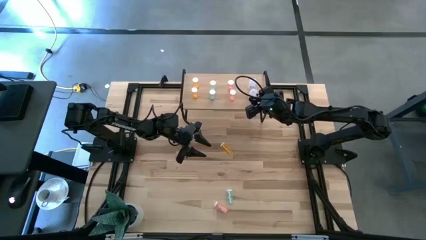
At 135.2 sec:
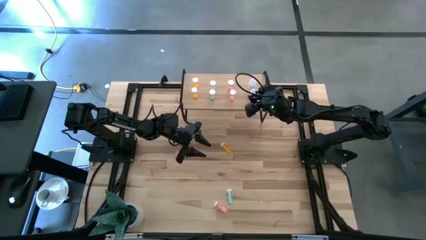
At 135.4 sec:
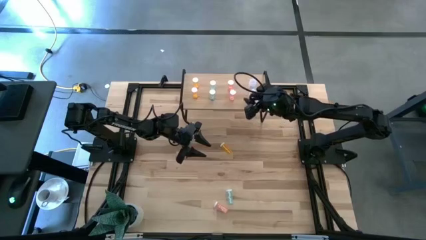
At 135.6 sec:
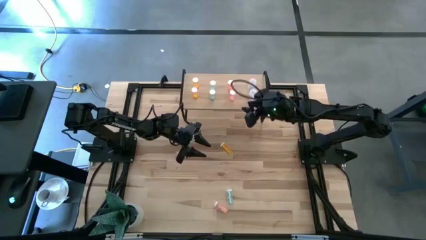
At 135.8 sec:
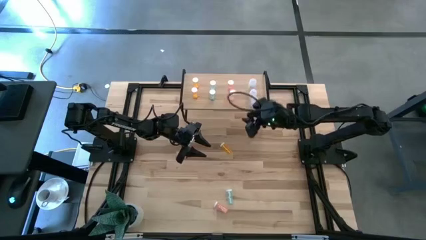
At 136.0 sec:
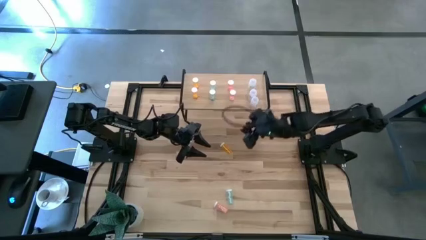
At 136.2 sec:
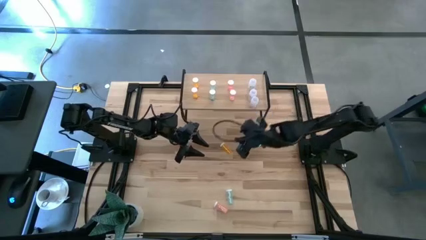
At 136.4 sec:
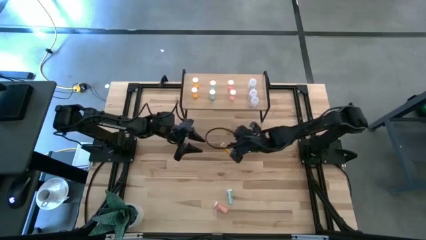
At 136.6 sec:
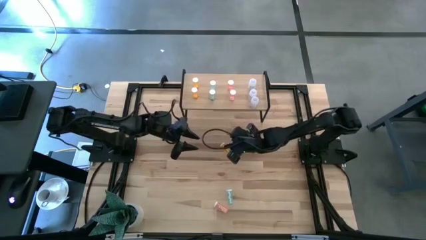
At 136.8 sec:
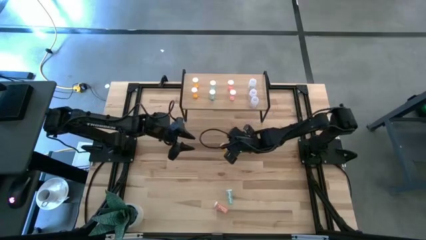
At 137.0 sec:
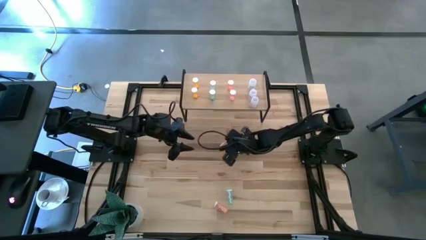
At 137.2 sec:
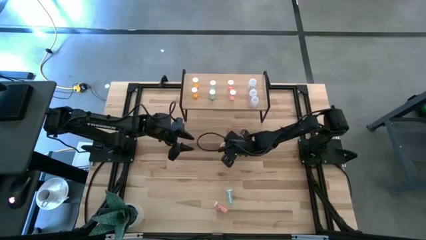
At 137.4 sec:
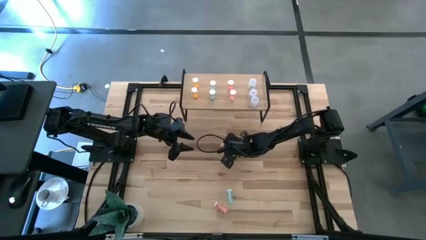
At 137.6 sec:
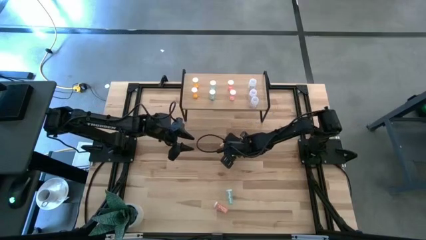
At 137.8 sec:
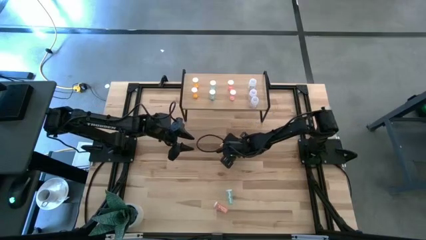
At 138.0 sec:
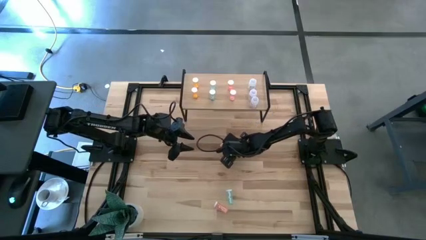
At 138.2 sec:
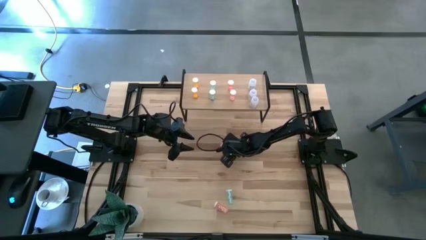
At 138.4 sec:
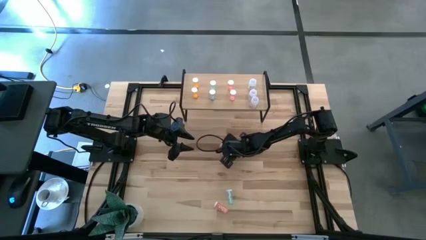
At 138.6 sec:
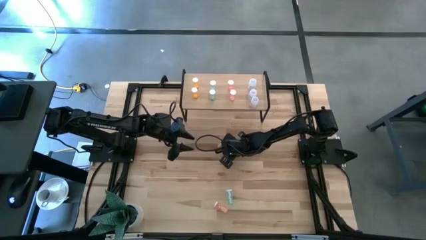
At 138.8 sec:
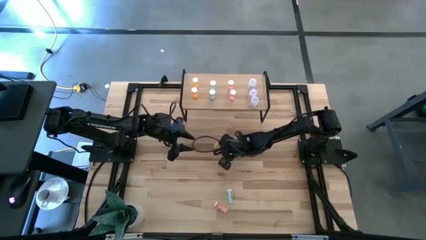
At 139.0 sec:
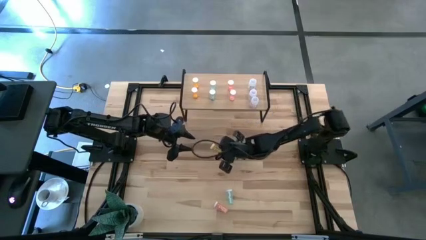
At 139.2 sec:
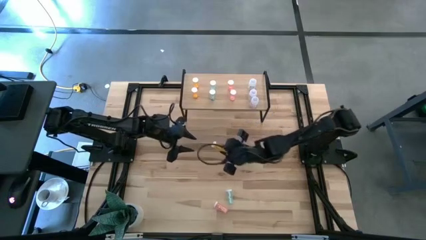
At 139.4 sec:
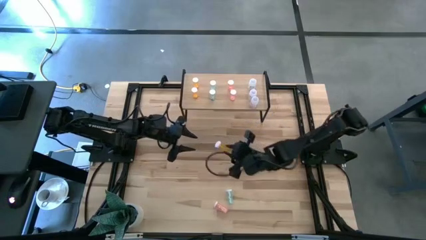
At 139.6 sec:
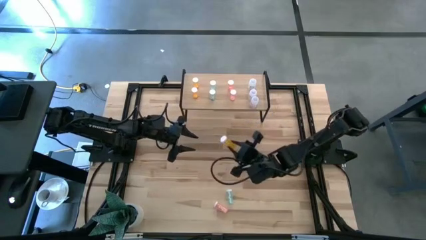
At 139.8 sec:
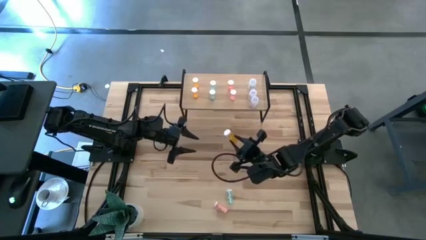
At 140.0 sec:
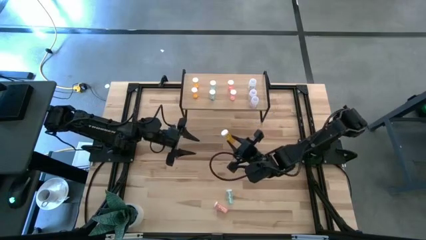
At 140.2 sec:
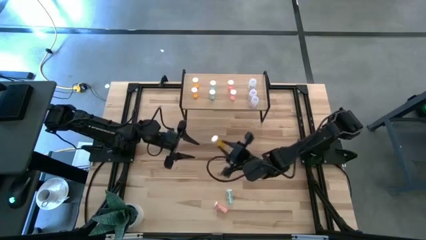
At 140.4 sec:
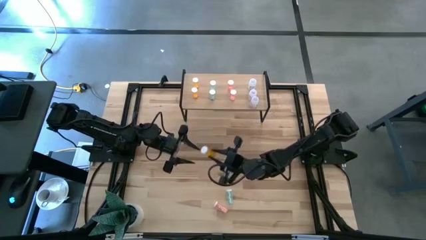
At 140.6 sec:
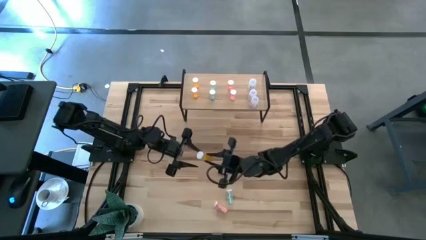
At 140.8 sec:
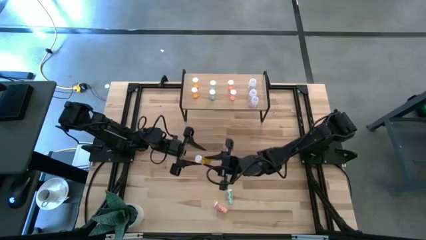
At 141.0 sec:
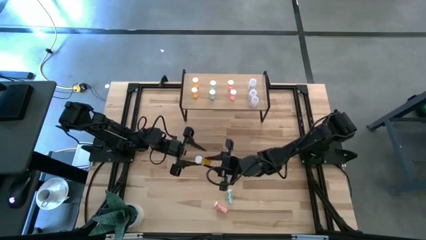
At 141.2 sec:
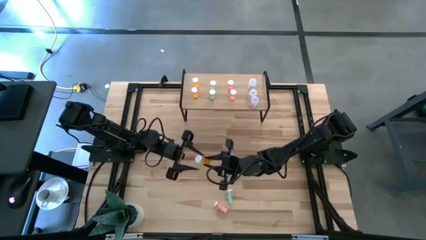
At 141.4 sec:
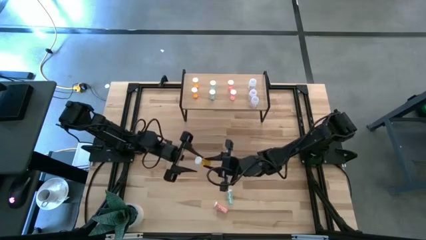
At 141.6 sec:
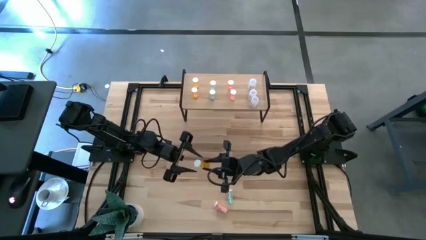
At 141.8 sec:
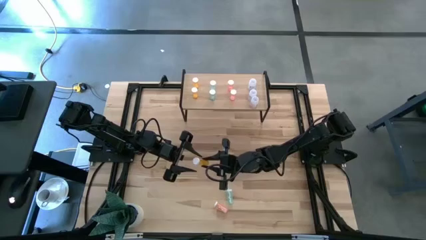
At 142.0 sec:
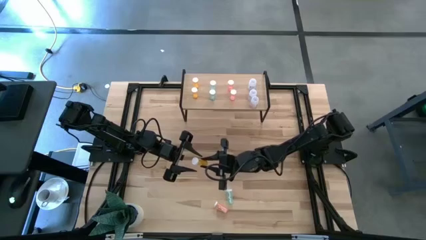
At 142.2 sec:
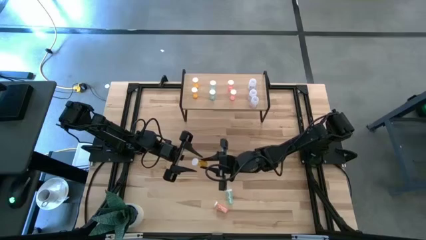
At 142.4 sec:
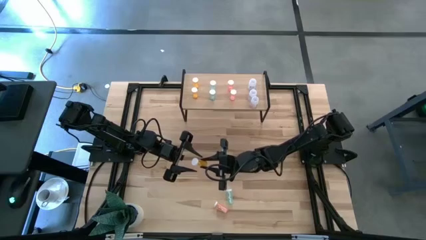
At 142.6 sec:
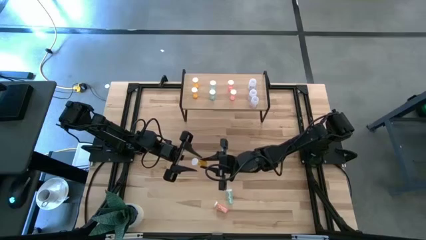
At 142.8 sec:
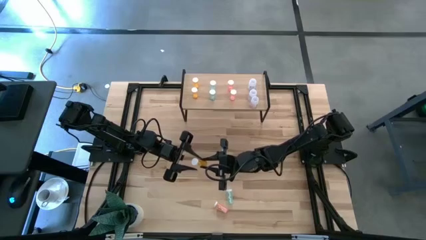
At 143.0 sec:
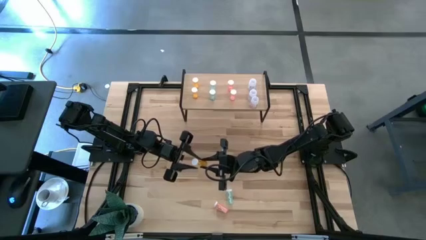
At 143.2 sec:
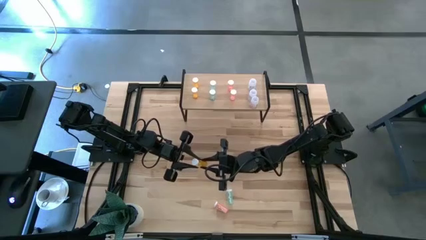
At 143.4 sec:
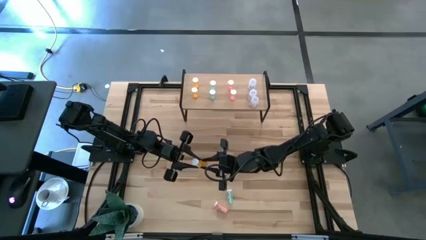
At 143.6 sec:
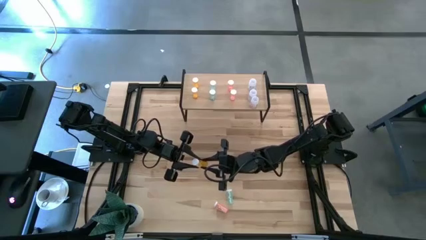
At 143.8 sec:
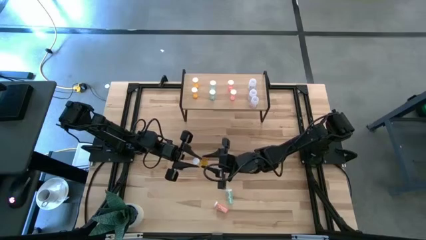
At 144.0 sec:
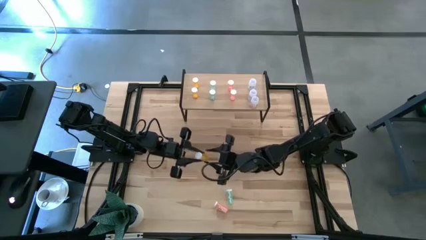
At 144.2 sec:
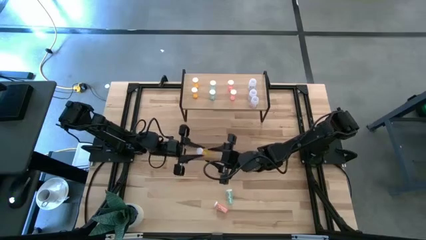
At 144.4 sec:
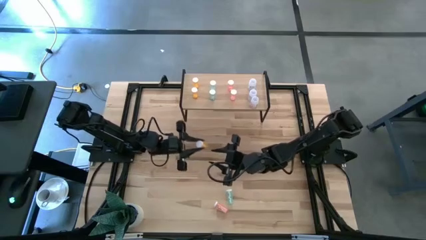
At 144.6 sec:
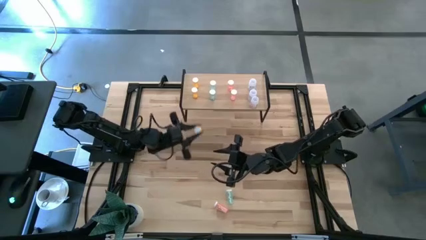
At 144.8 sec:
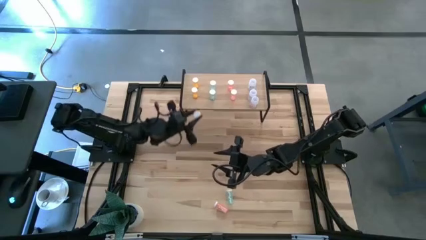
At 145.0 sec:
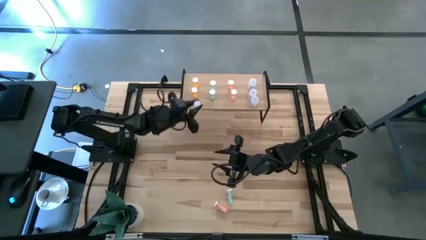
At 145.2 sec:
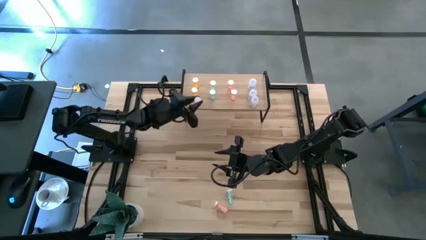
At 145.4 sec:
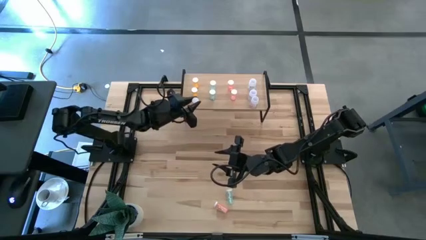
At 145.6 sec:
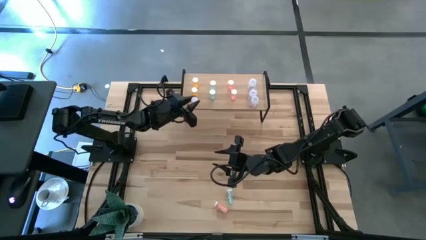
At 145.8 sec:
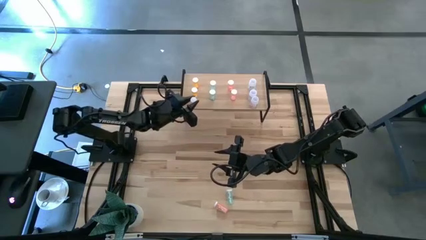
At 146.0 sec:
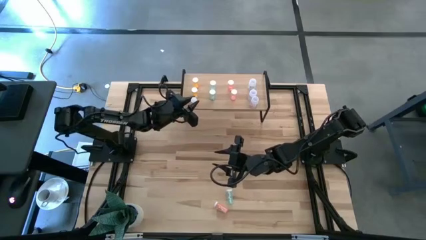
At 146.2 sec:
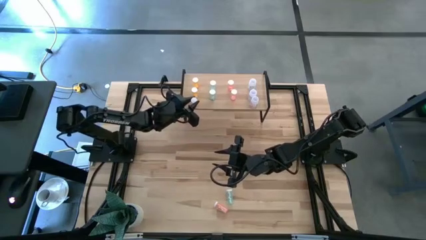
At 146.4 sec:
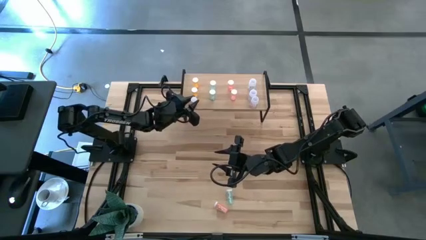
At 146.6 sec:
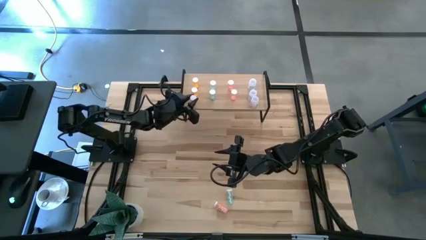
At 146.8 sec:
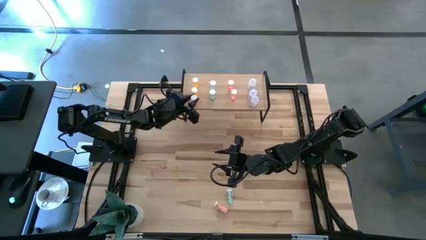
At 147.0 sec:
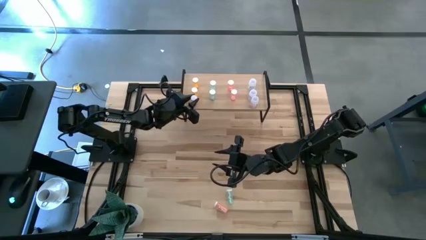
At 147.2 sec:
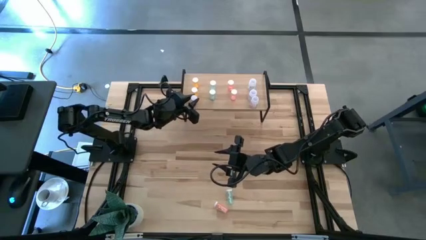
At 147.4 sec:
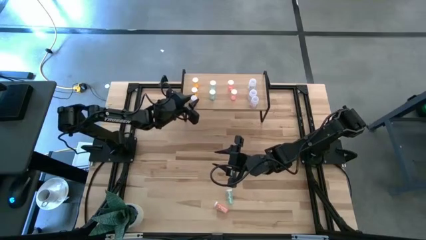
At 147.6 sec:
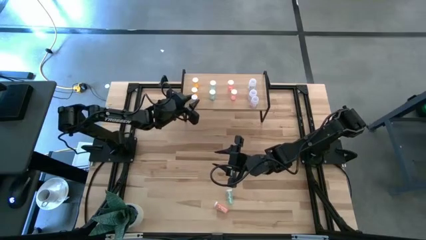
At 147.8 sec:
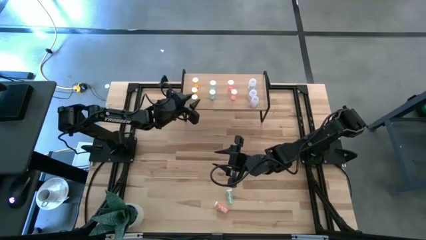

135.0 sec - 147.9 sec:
Task: Pick and place medicine bottles onto shelf by color
Put the orange pill bottle on the shelf aligned with the orange pill bottles

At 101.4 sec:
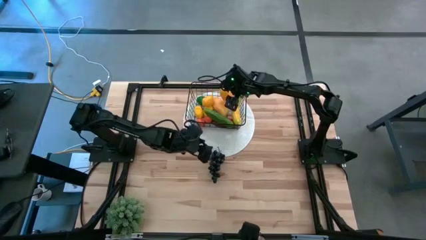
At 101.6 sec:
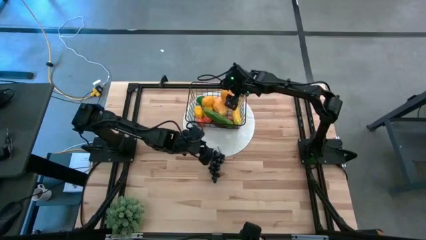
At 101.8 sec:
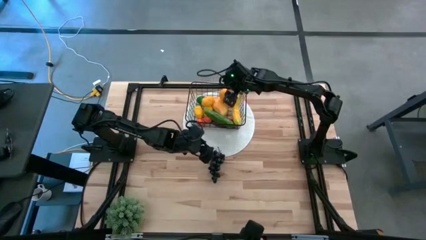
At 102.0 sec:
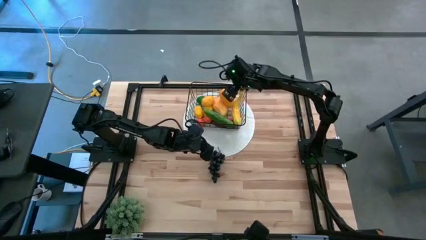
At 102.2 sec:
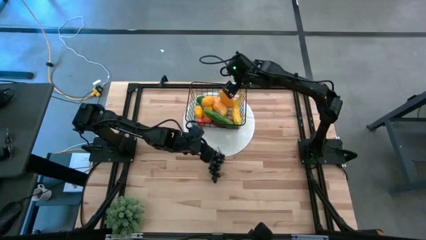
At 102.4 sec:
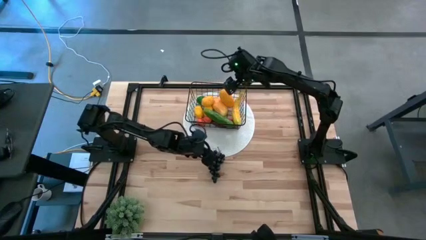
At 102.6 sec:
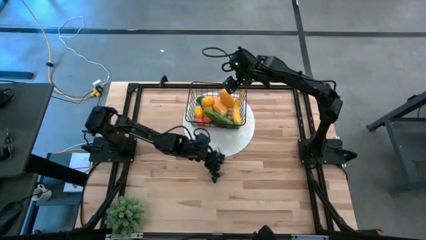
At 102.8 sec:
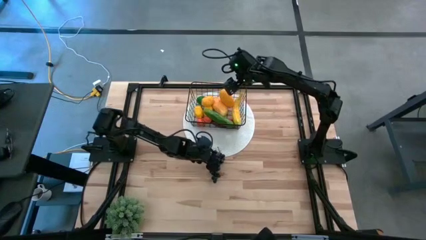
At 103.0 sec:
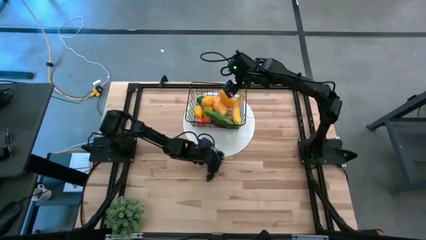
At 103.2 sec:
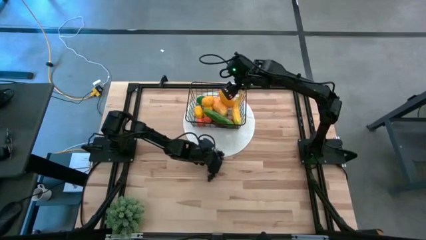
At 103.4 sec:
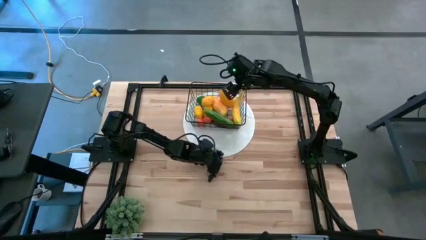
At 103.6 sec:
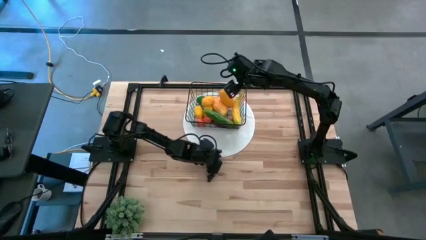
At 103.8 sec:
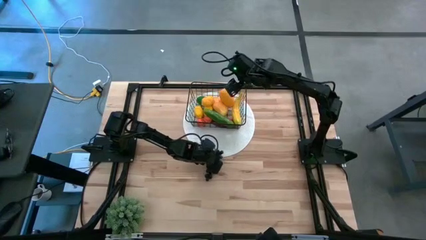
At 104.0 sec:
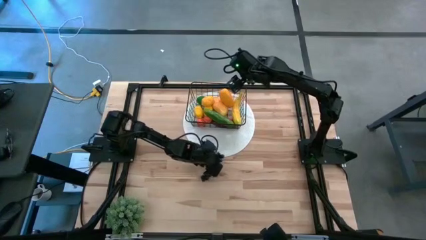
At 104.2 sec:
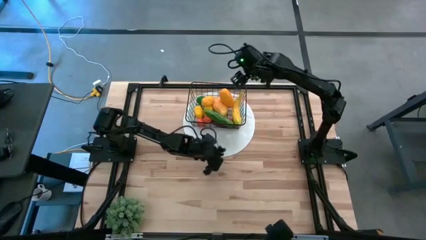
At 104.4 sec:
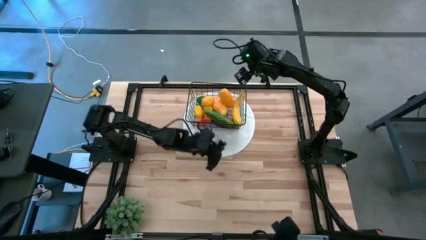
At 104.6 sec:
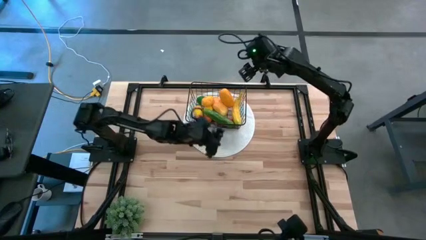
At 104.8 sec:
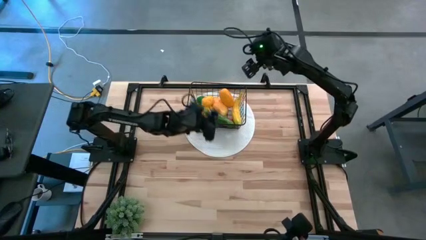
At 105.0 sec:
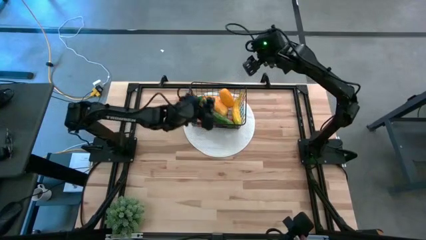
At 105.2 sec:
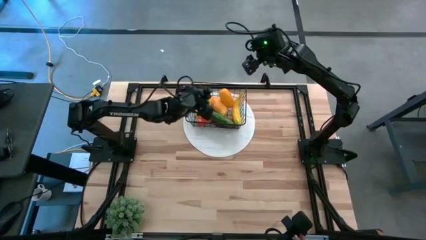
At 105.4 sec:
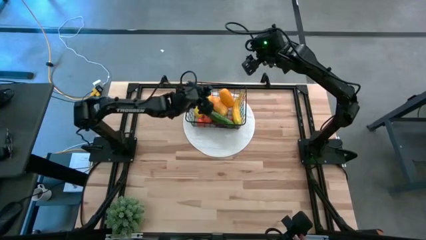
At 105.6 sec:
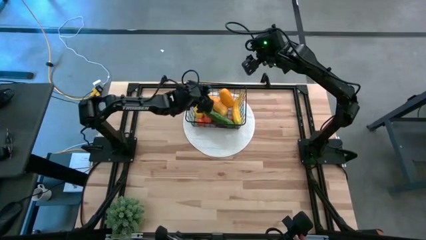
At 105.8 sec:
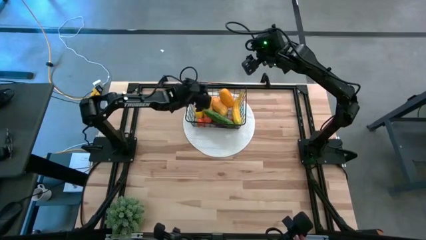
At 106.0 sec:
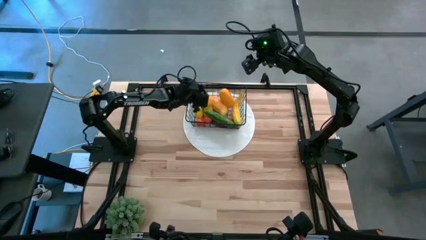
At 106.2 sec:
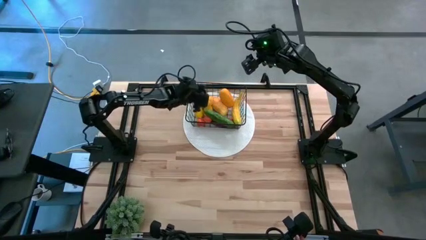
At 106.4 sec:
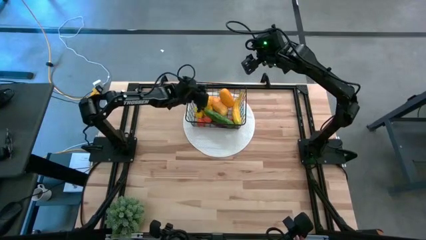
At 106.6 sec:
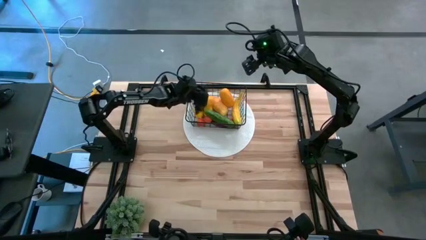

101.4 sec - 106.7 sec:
Task: Build produce basket
Put the black grapes into the black wire basket
